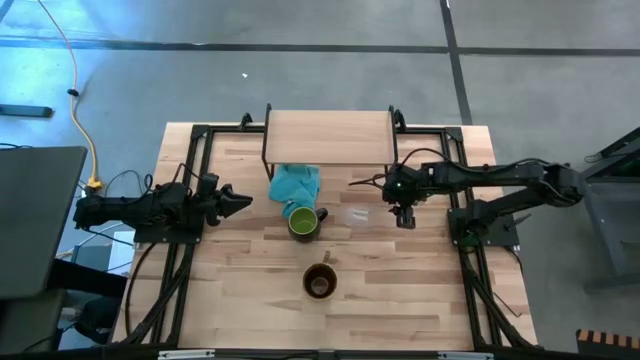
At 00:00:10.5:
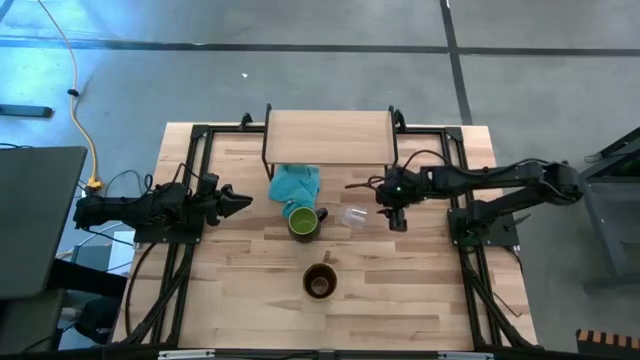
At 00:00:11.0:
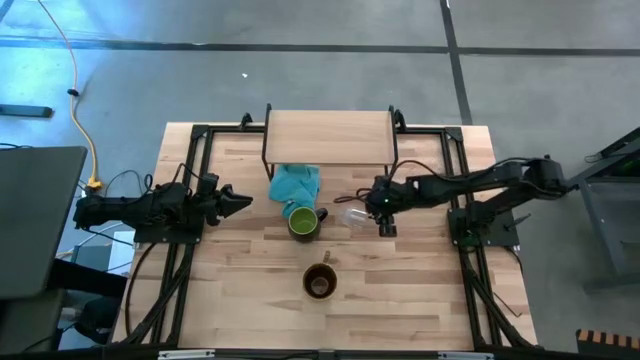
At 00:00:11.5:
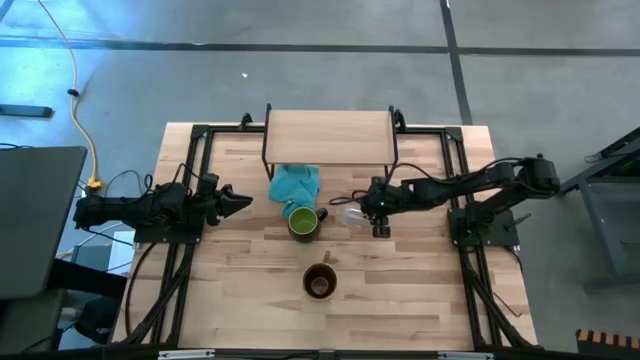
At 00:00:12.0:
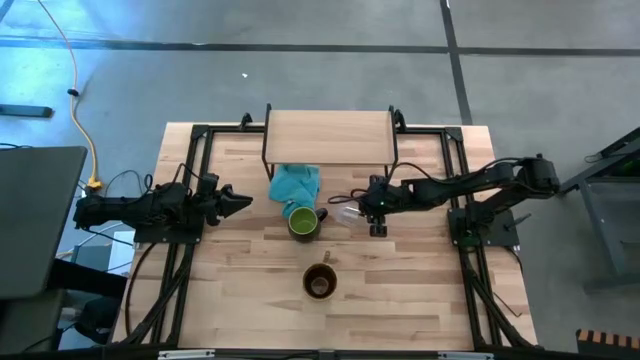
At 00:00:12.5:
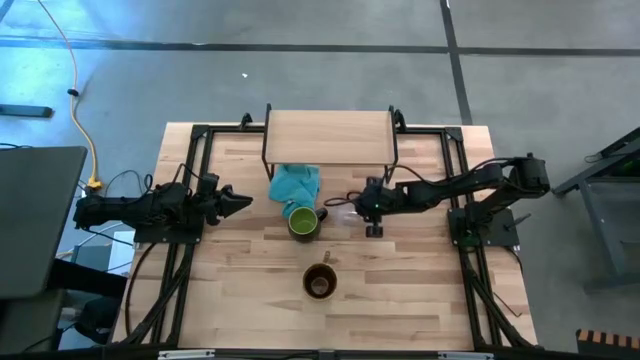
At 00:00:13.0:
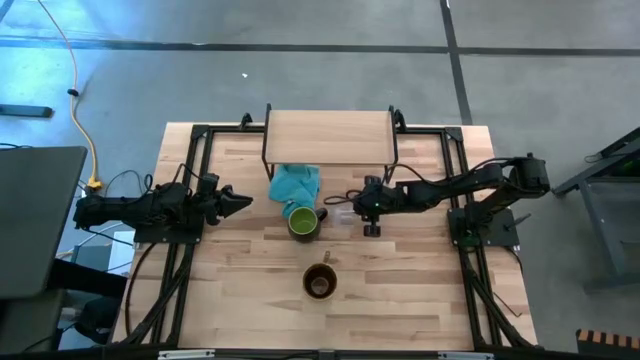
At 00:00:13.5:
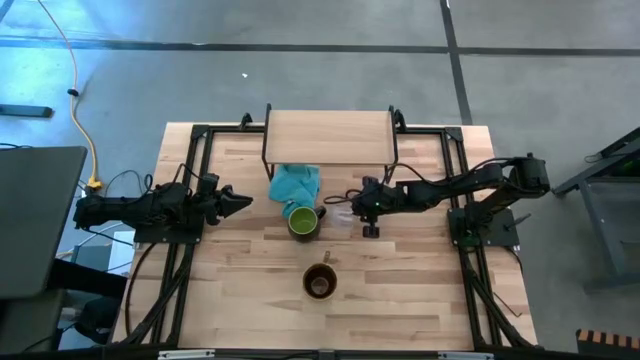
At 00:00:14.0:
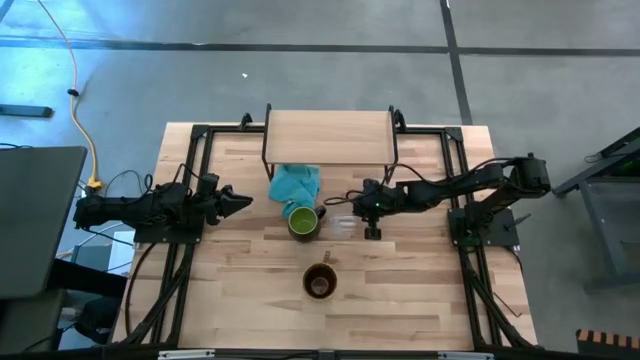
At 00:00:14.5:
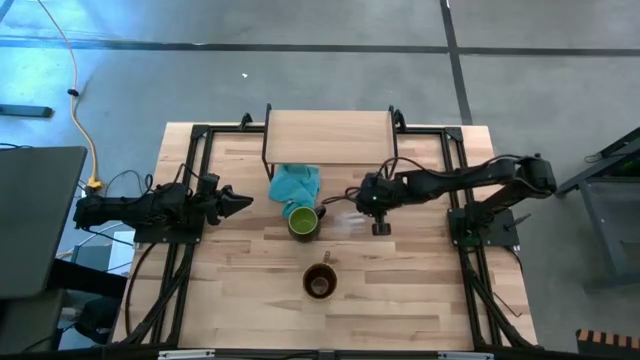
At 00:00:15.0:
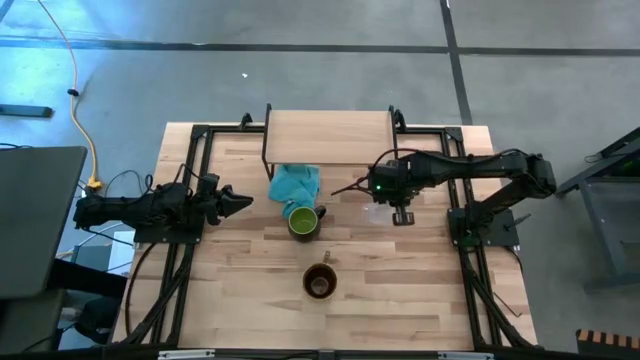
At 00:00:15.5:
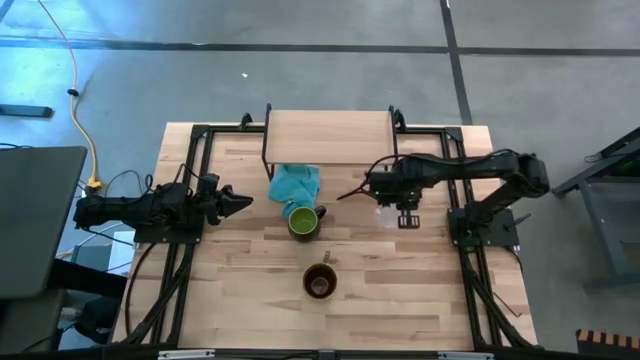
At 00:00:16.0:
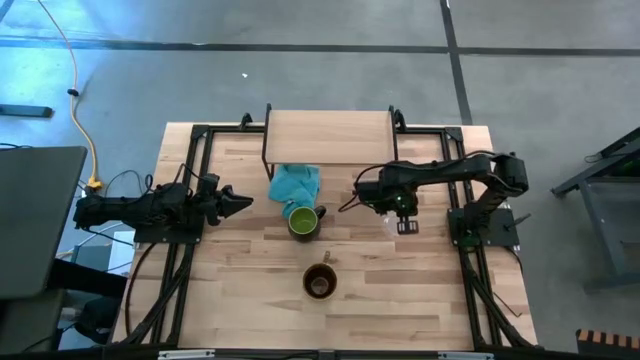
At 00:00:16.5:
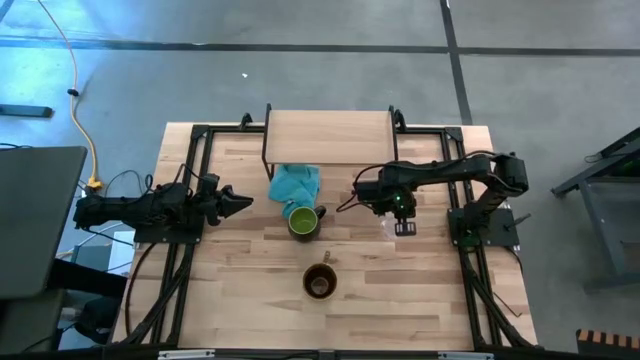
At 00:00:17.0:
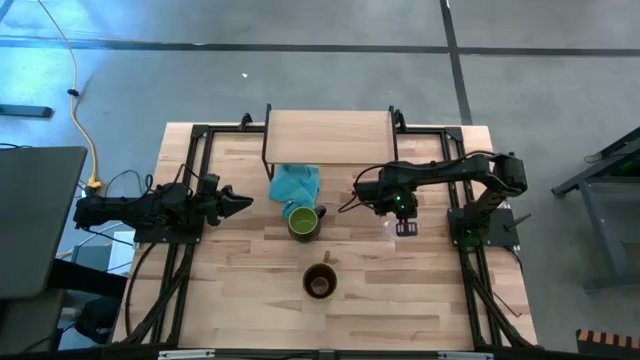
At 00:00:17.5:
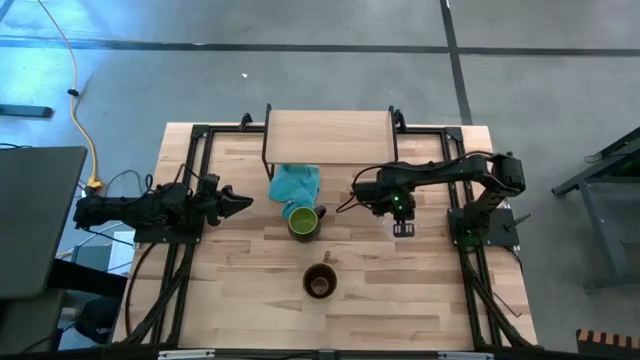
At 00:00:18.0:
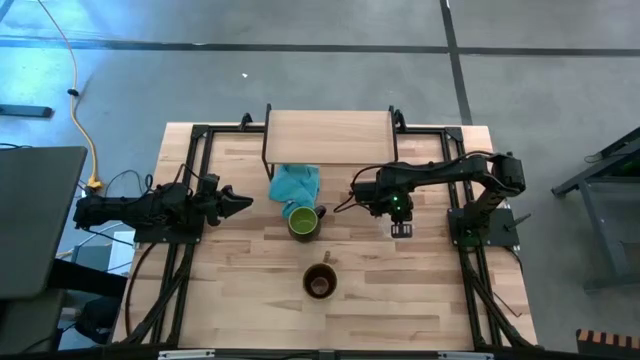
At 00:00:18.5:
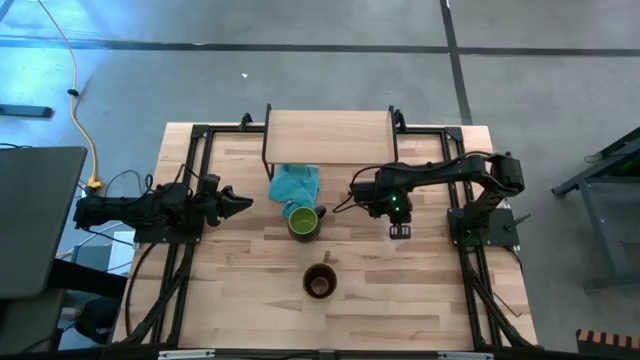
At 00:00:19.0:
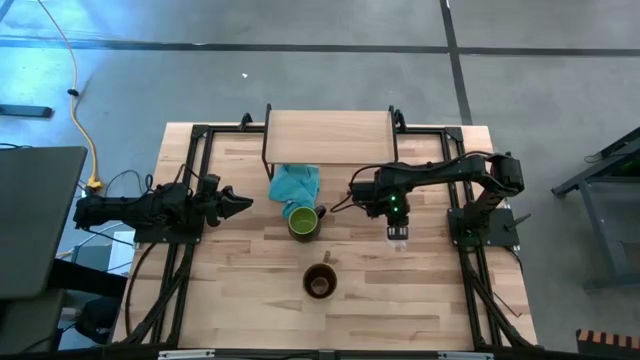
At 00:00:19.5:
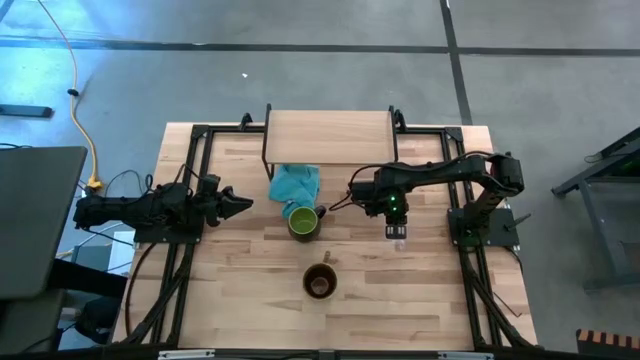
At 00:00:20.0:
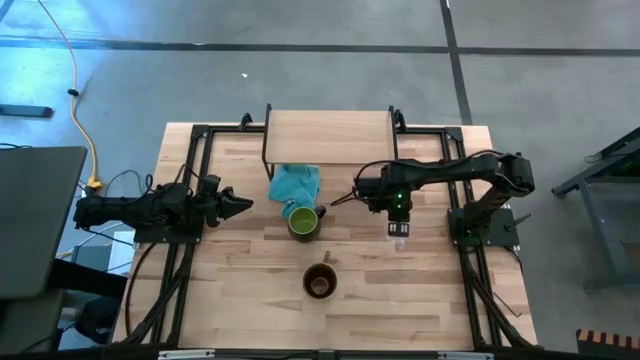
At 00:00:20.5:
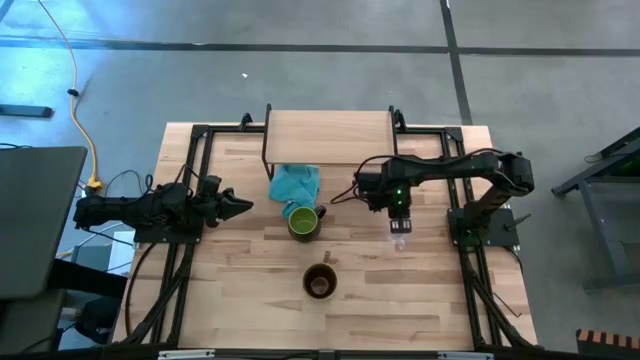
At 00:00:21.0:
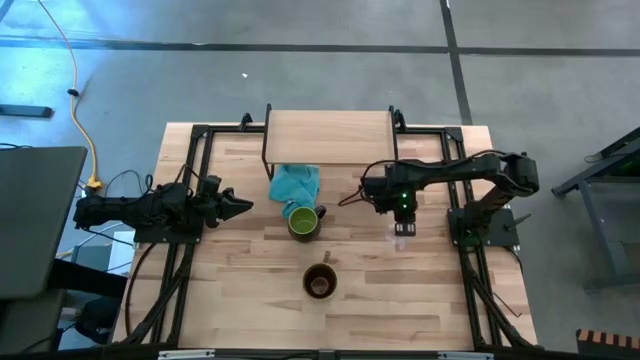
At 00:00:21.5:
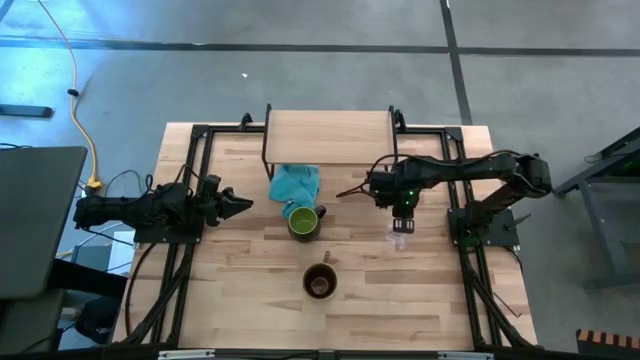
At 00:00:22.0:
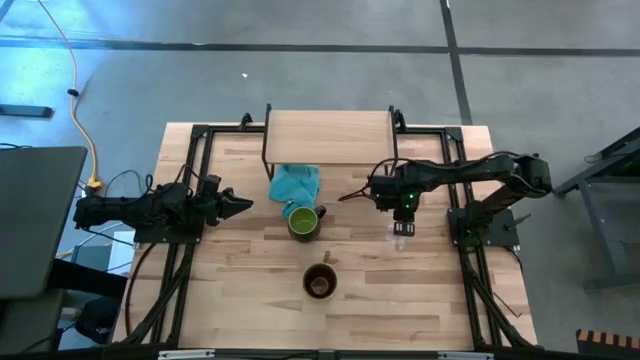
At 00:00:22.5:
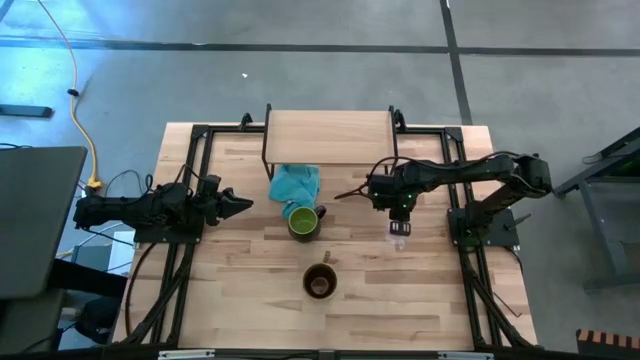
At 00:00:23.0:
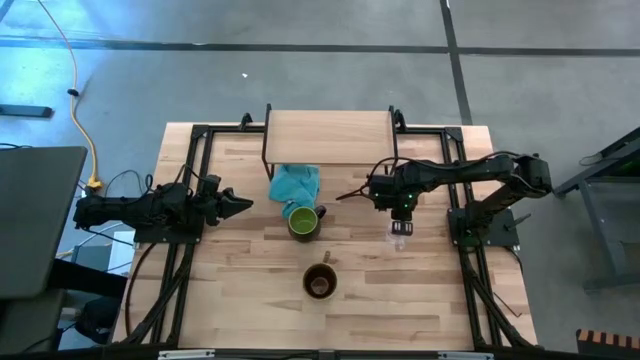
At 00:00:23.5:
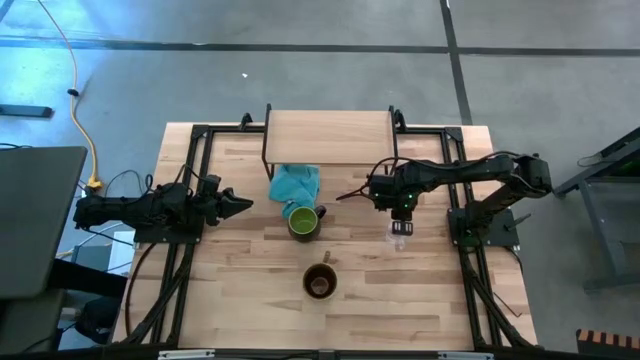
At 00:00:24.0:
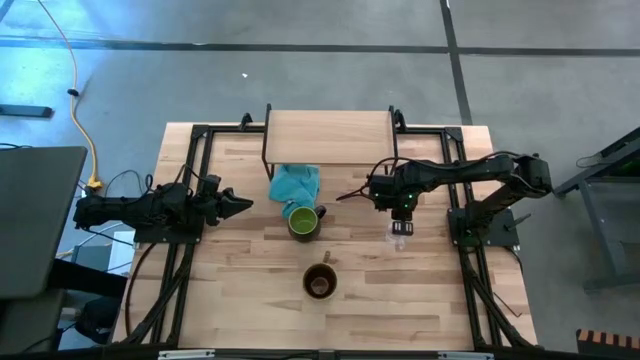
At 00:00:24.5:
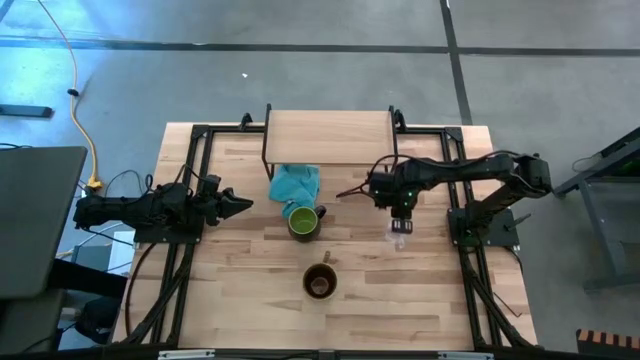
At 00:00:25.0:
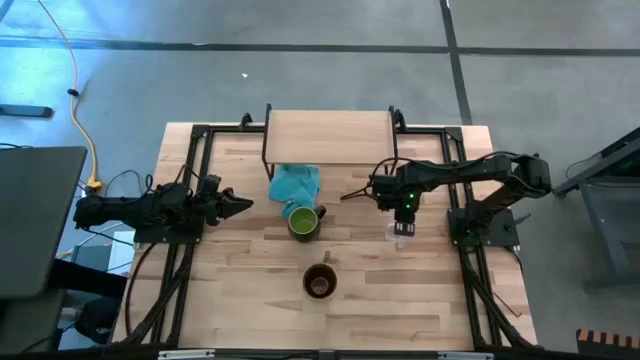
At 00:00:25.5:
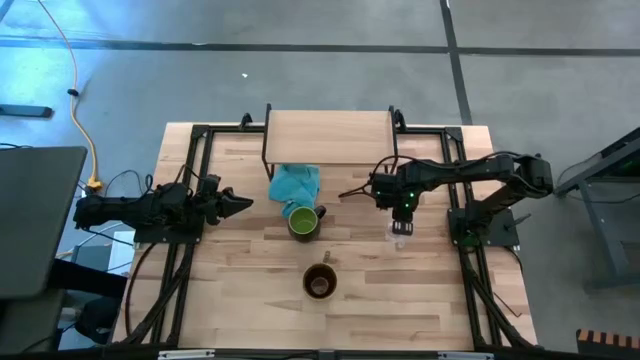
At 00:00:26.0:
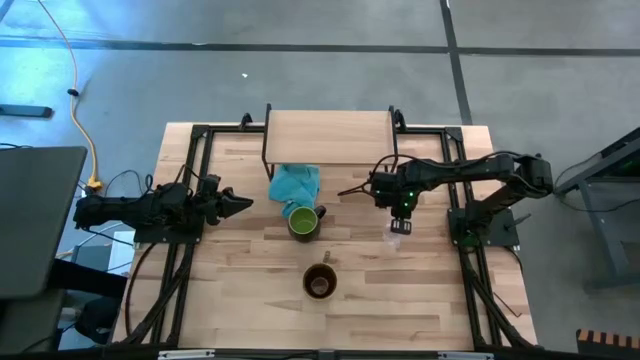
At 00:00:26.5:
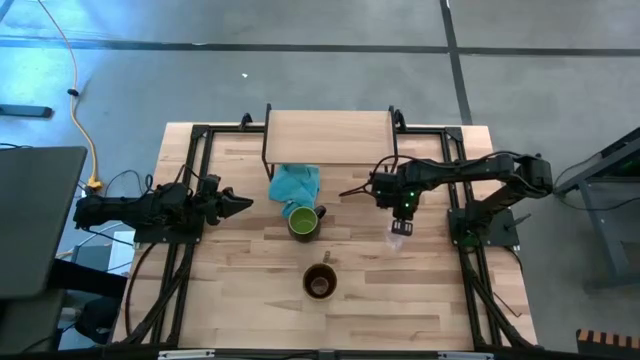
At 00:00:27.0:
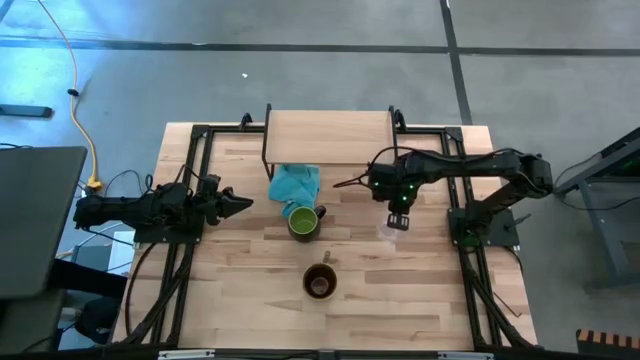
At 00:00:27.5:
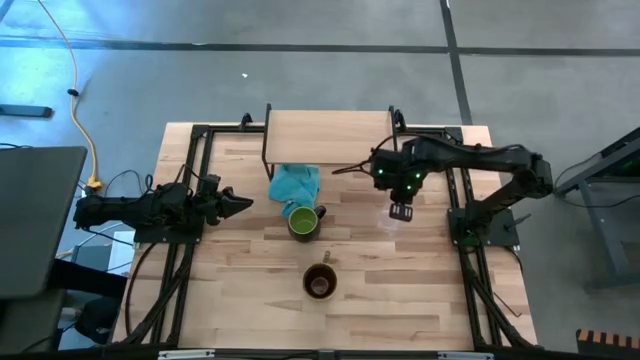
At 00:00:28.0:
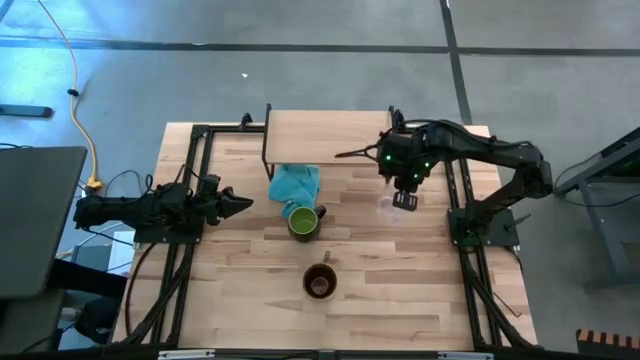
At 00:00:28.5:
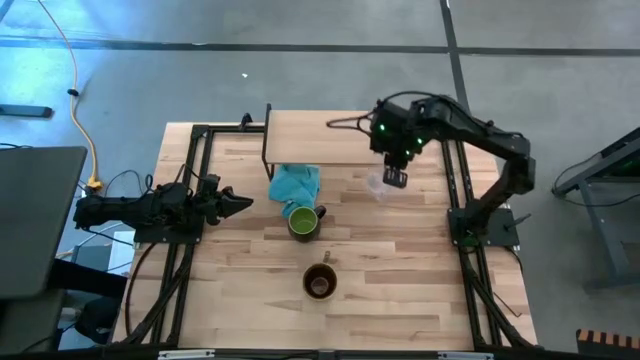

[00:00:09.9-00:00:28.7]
Task: Stack small to large cups/mugs on shelf
Put the transparent mug on the shelf
